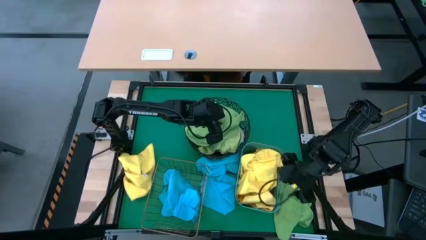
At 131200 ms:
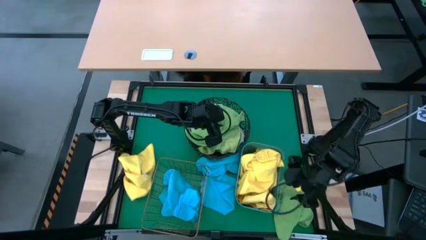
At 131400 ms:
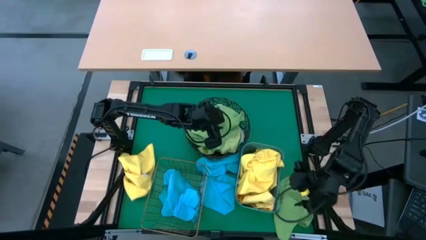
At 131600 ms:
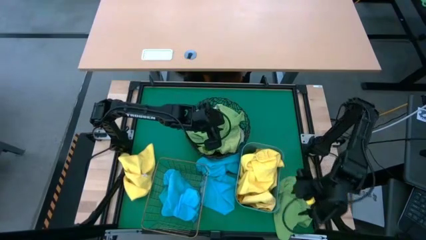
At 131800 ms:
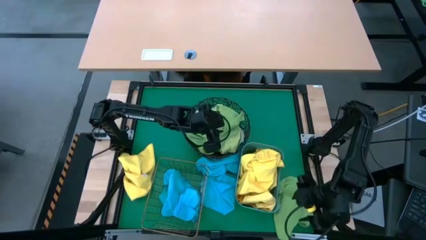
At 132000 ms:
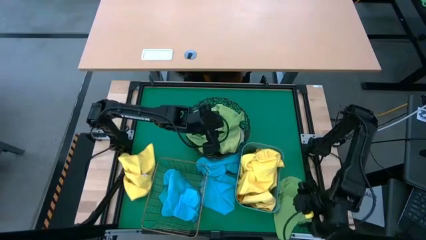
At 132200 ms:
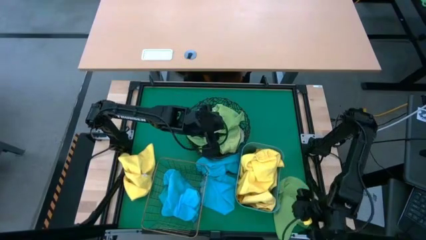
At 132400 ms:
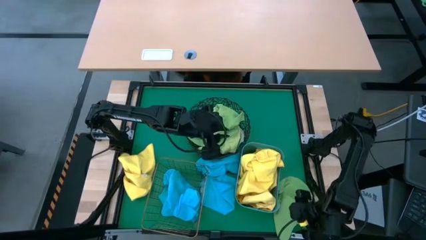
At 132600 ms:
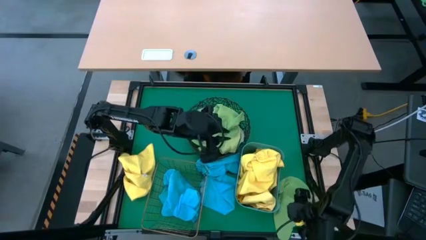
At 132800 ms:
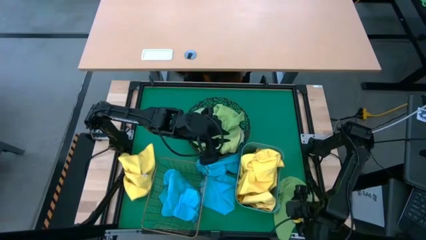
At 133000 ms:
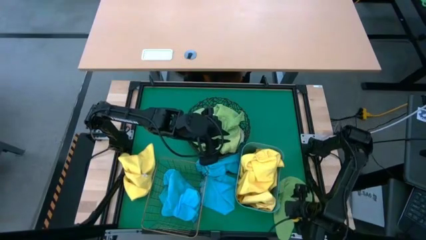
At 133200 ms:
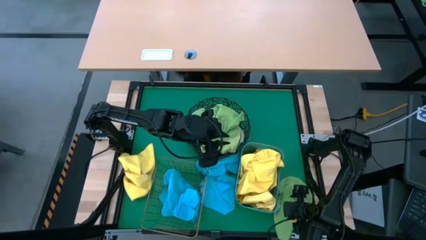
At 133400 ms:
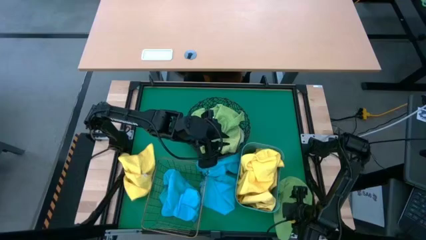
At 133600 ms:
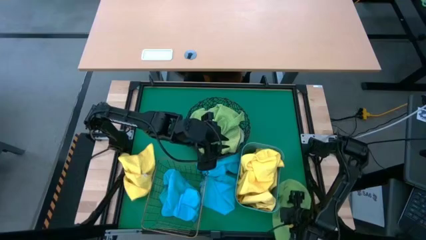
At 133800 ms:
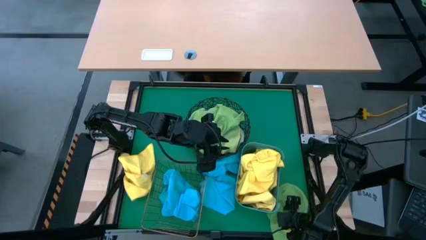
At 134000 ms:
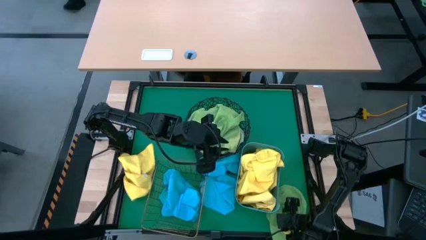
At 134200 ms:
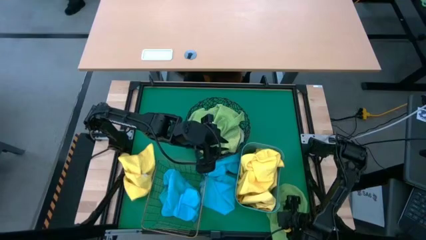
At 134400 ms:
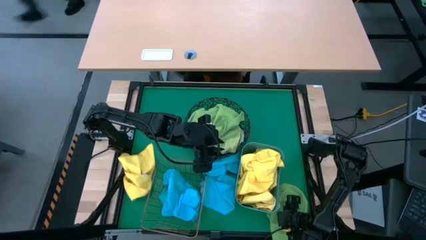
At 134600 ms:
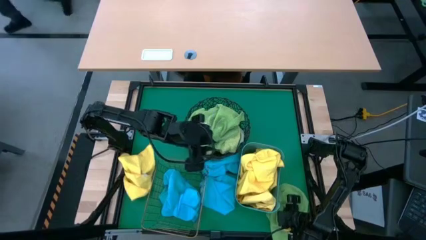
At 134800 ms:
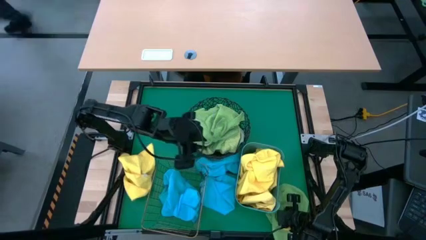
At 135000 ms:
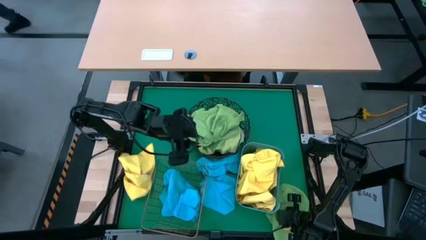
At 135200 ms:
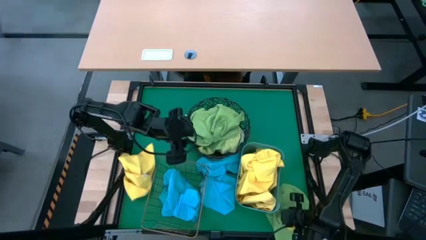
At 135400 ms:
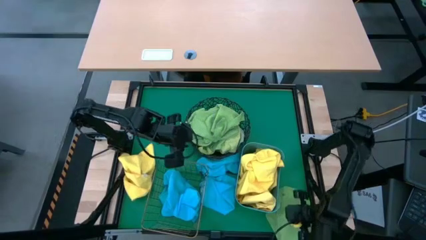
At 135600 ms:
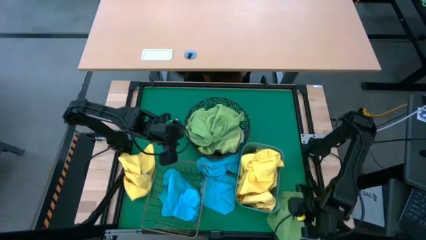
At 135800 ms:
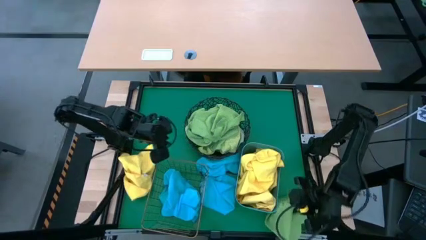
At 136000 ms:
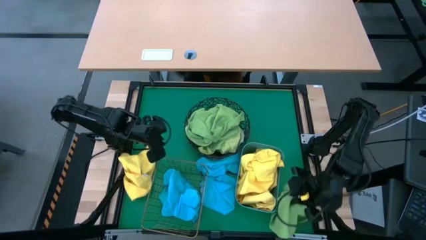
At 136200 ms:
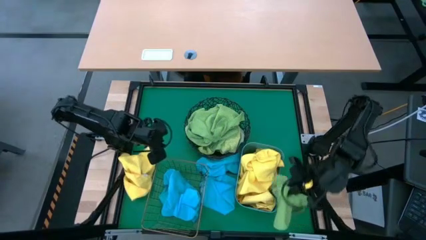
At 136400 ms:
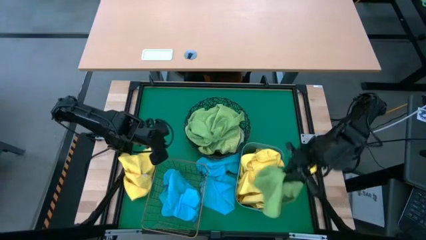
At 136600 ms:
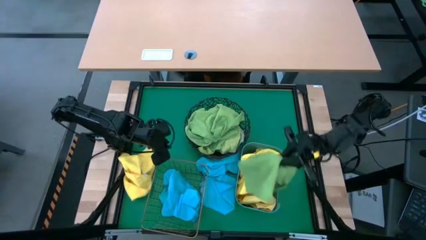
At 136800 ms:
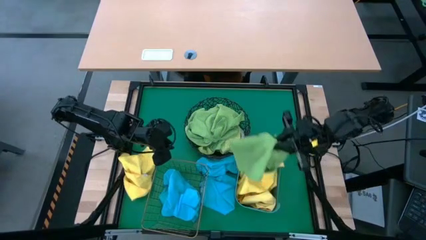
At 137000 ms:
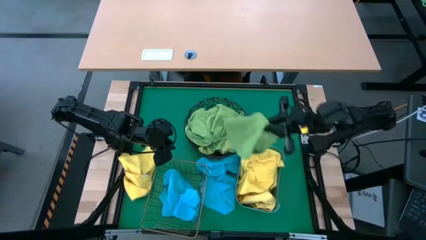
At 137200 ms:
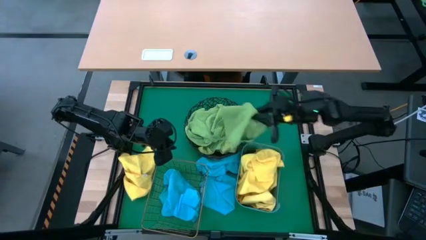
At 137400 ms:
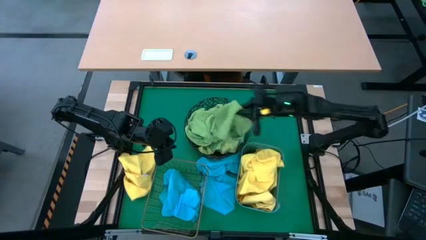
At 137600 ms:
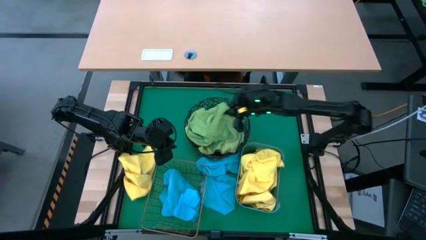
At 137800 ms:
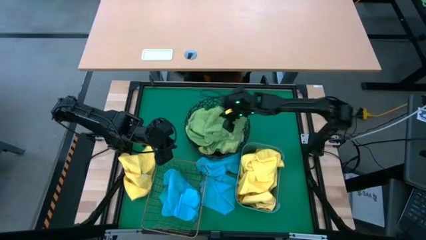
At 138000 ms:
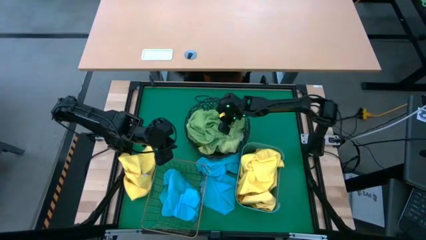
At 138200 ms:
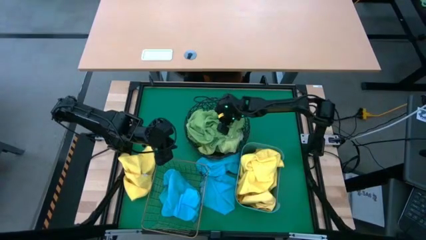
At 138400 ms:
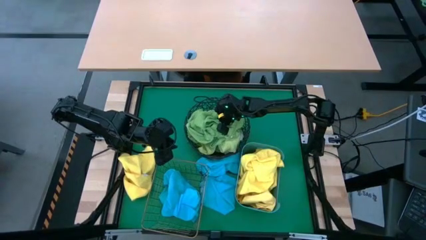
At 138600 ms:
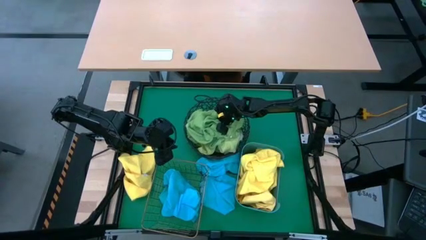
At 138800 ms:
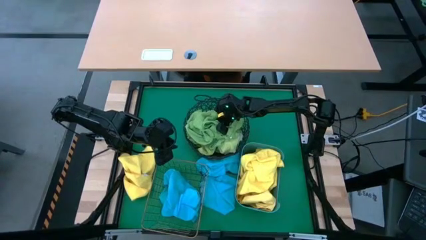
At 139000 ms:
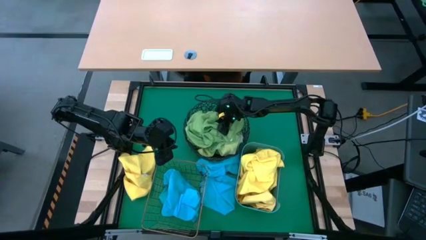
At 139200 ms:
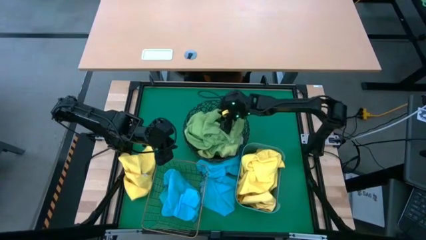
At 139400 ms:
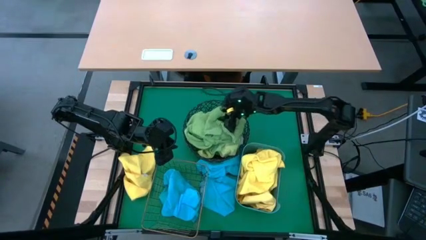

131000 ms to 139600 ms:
Task: Sort microfiber towel by color & place in baskets
Put the green microfiber cloth into the round wire basket

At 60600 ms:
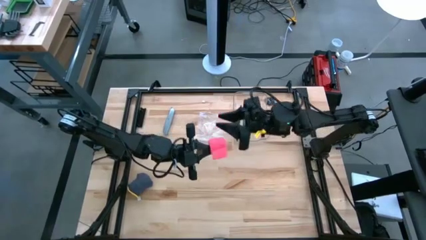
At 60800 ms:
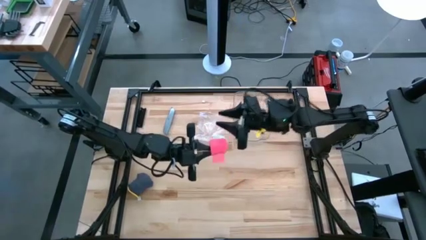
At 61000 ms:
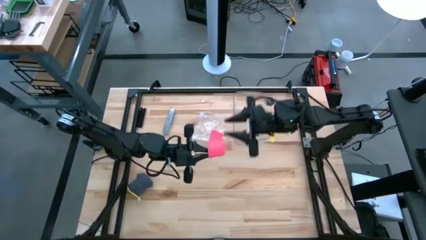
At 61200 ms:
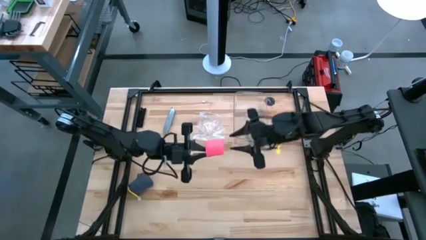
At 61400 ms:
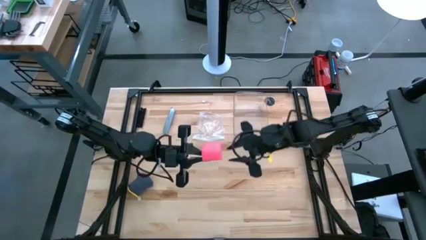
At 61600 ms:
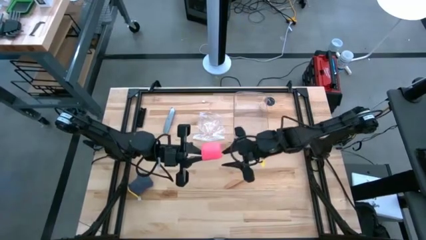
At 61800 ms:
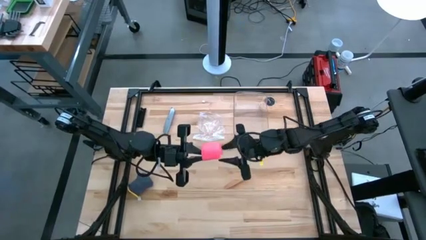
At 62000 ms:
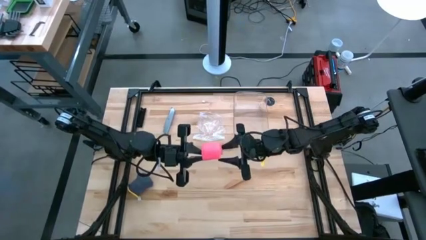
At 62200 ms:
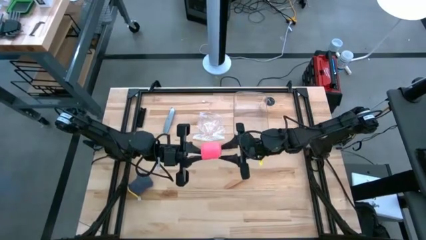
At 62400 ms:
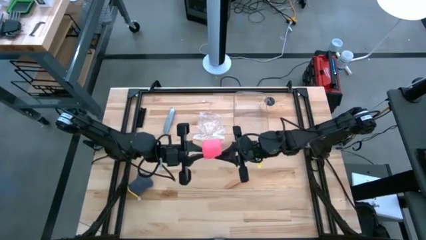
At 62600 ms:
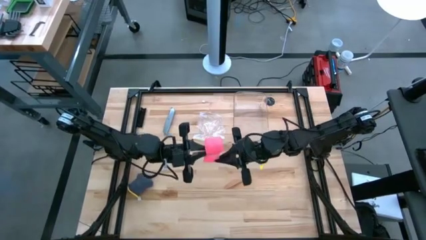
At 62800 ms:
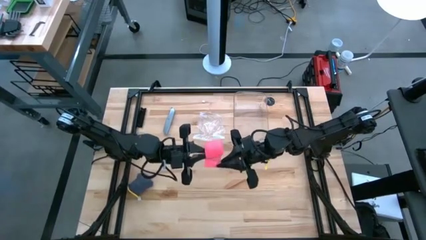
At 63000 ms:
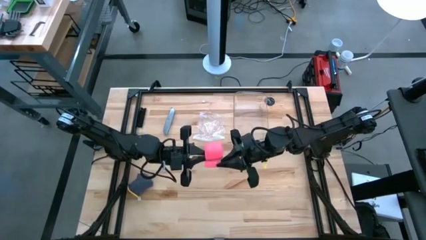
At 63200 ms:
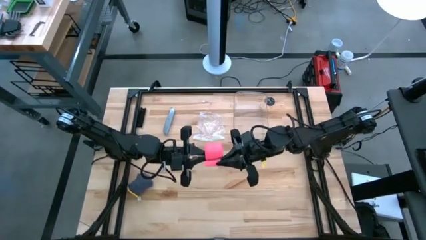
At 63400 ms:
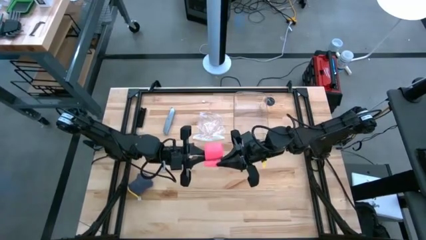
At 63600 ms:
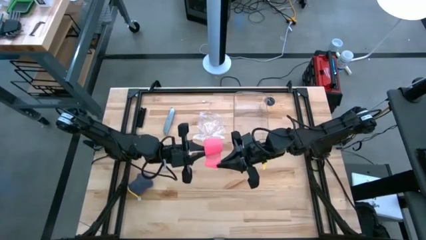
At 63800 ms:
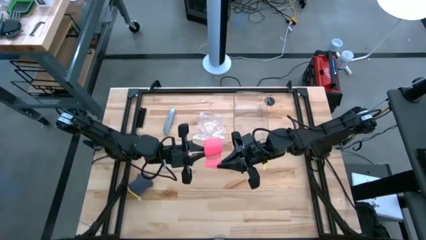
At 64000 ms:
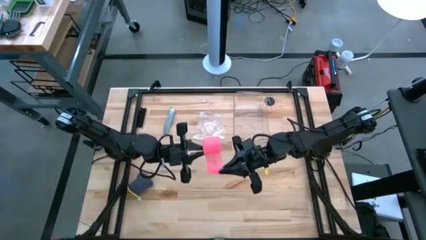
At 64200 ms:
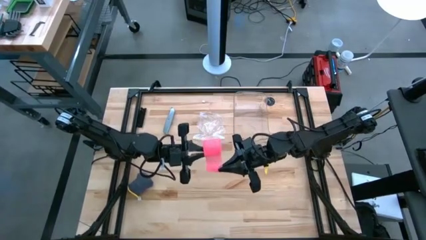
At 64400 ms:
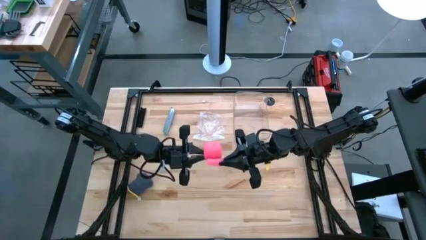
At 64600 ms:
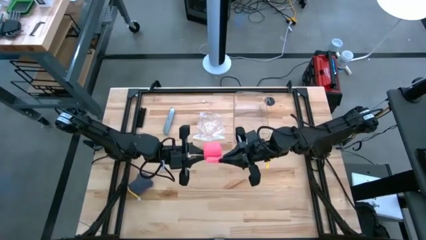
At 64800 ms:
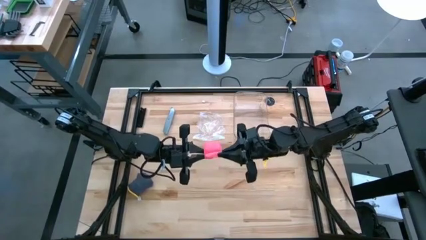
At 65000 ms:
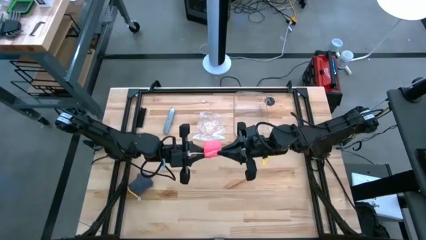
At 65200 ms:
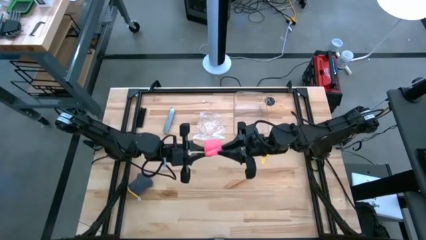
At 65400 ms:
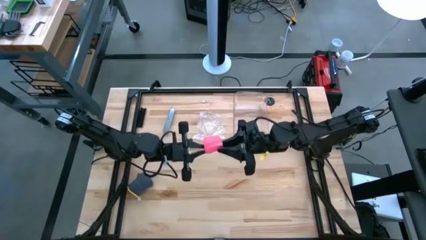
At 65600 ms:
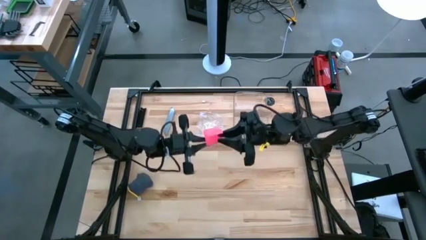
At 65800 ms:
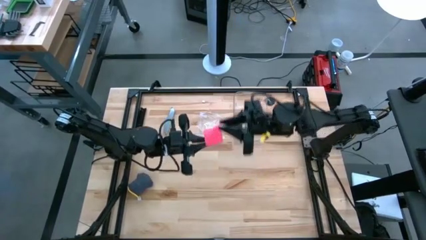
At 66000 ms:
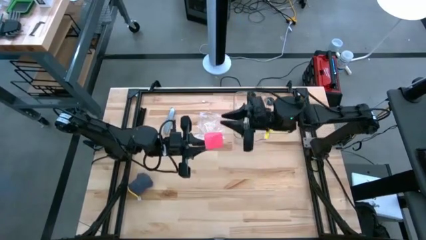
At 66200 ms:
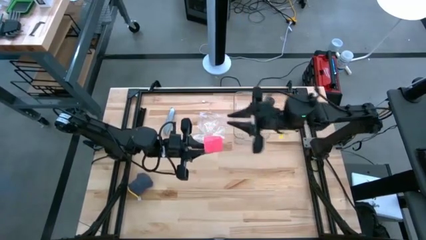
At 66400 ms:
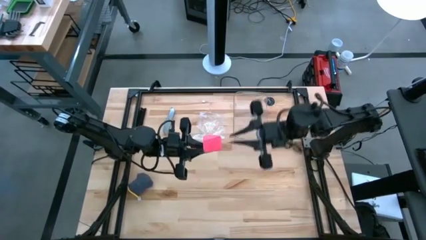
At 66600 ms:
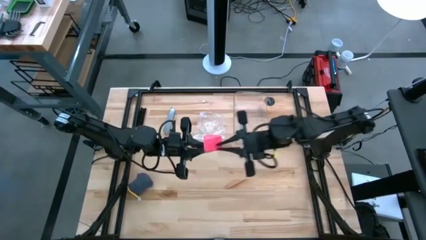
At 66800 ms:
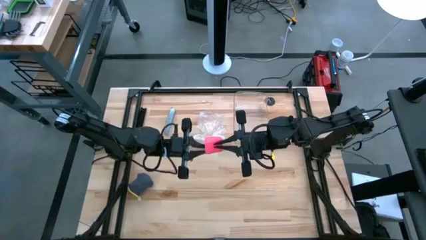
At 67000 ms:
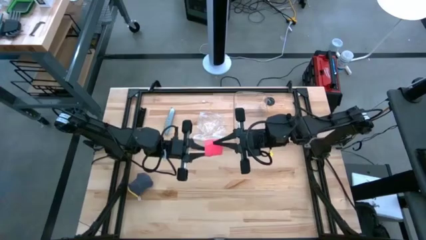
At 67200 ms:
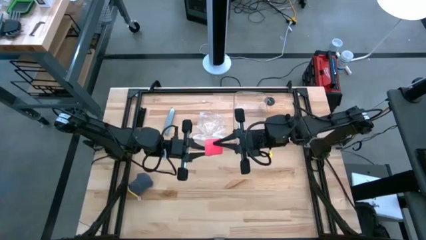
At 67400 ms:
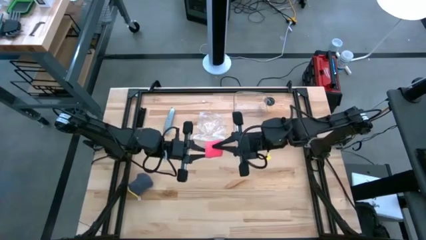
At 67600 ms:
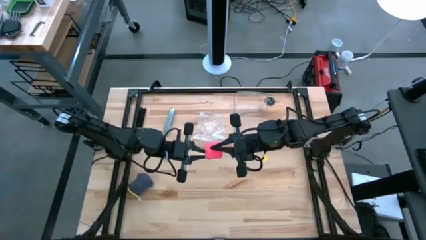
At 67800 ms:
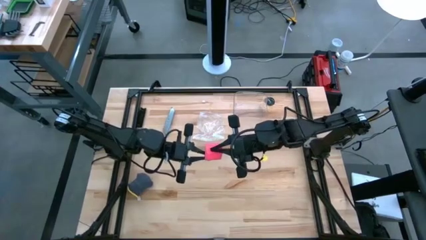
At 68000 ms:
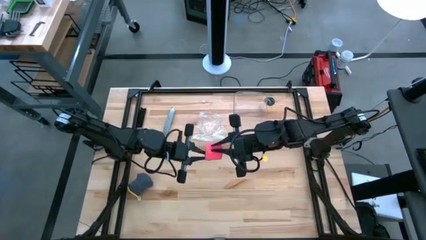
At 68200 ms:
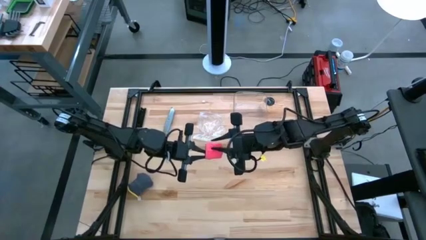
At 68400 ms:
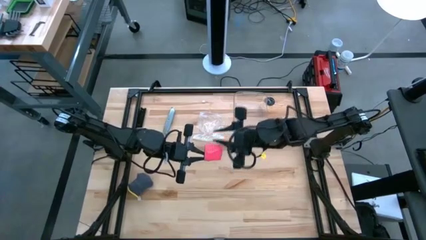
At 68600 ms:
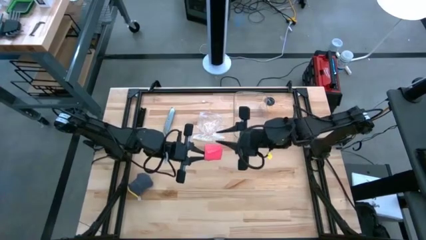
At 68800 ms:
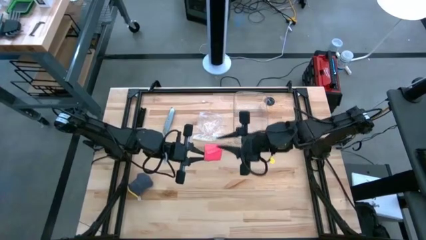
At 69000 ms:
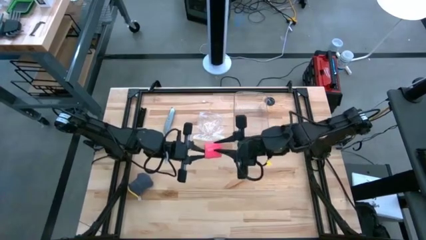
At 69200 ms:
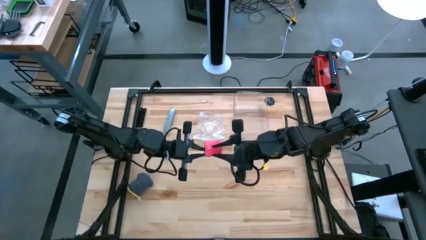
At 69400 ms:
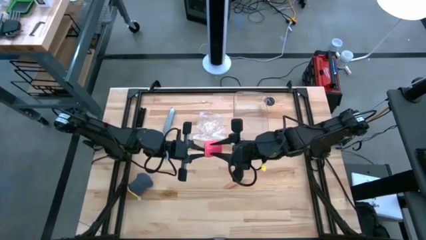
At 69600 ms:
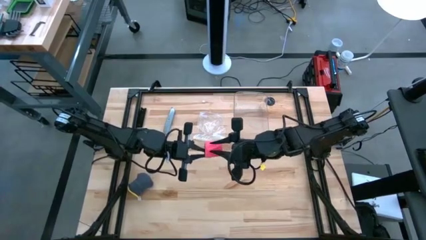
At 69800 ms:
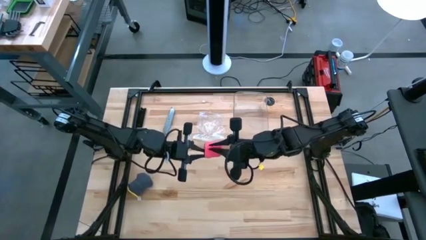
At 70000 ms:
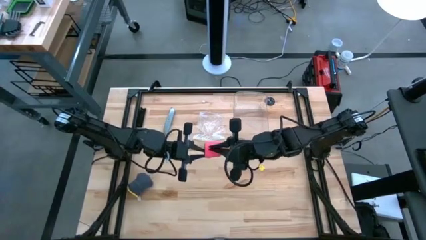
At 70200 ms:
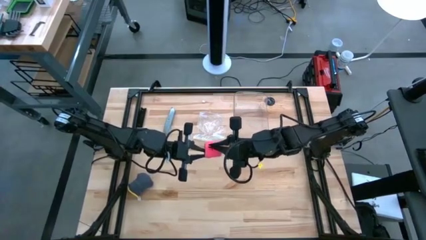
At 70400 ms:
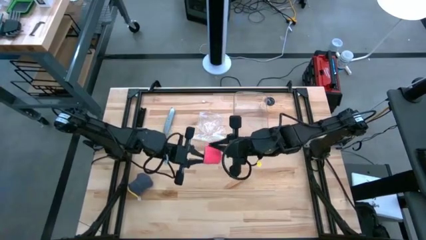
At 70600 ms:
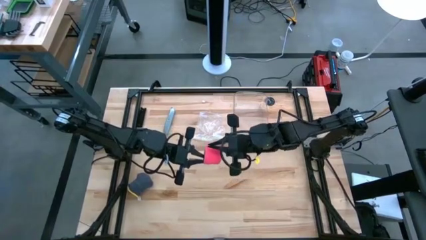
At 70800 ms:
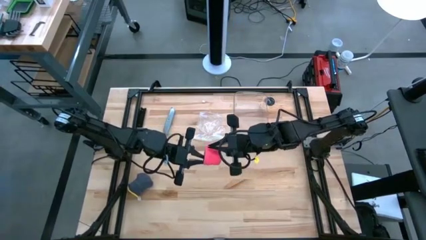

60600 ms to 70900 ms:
Task: Roll bandage
Roll the pink bandage
